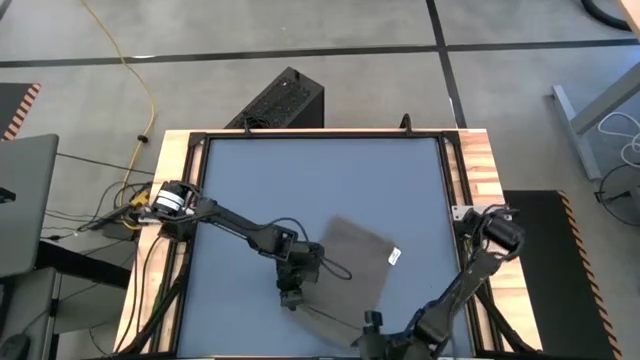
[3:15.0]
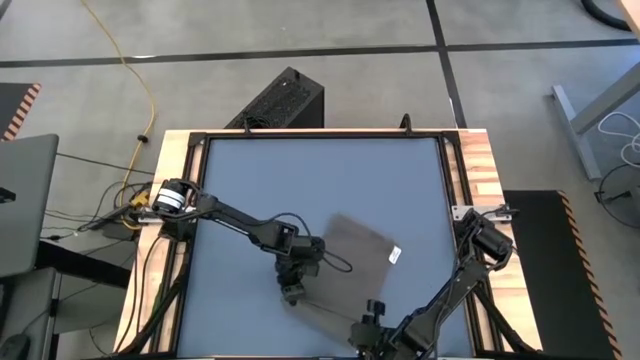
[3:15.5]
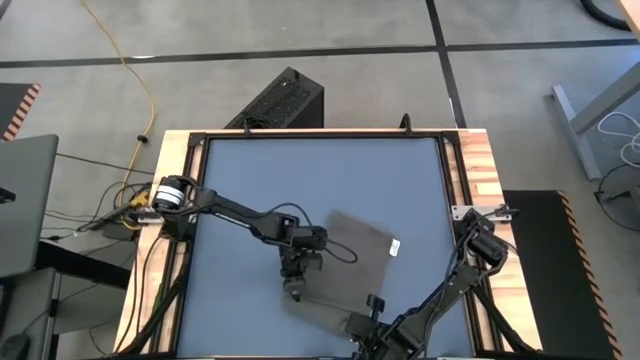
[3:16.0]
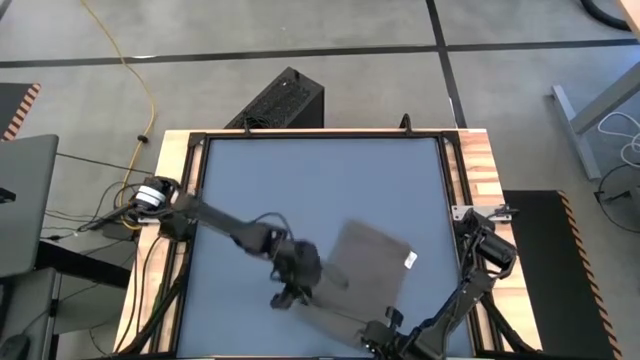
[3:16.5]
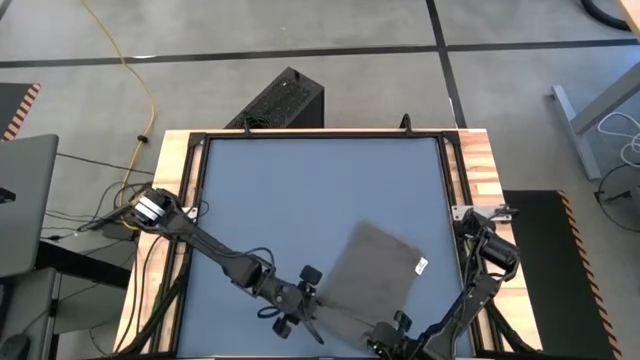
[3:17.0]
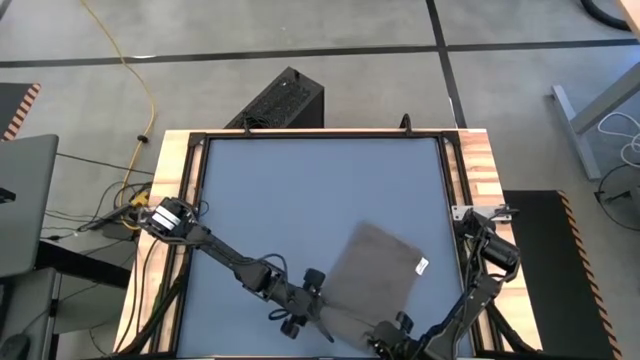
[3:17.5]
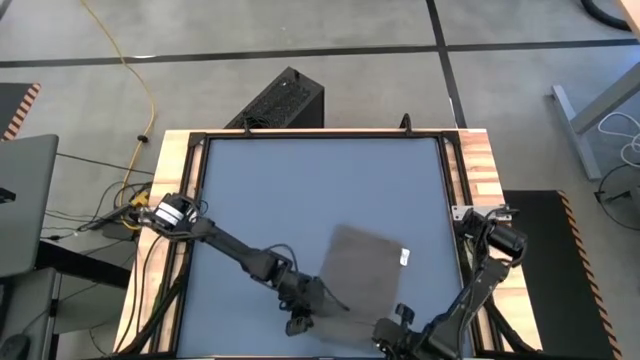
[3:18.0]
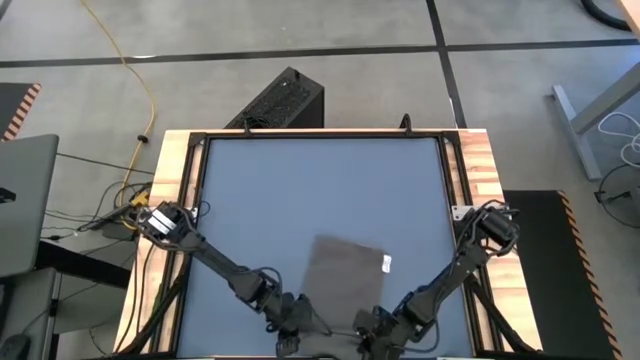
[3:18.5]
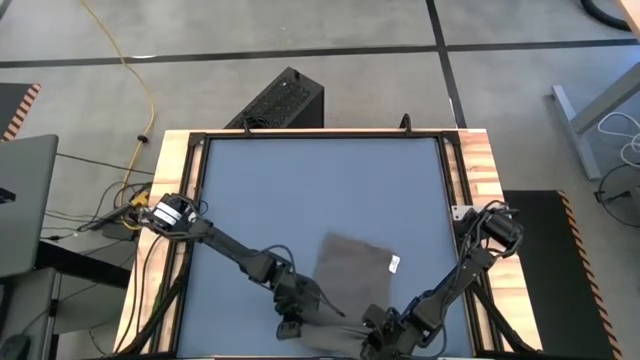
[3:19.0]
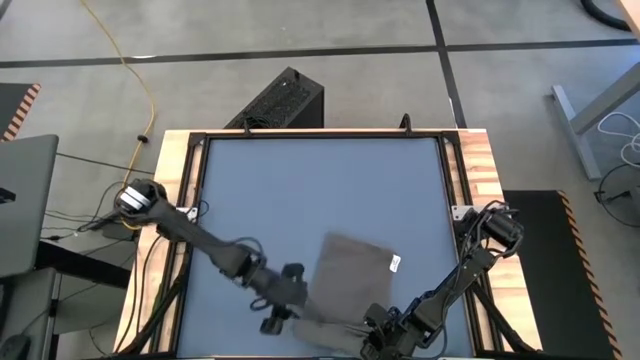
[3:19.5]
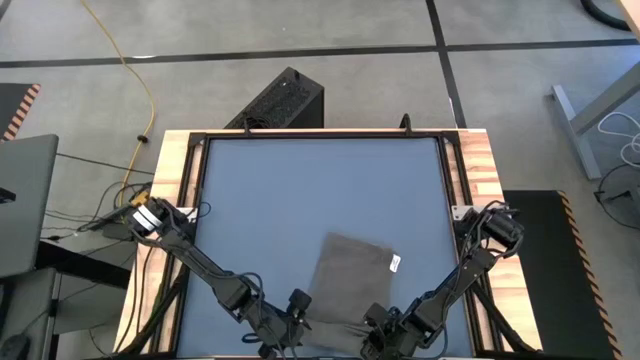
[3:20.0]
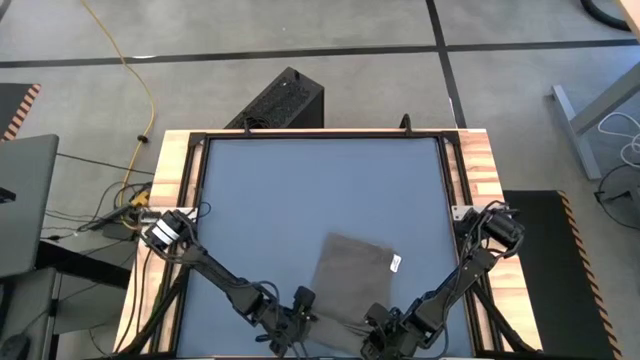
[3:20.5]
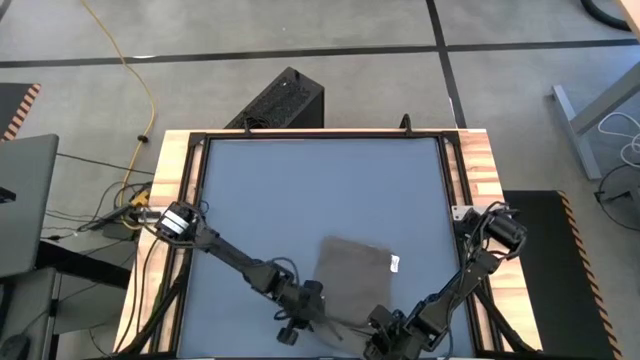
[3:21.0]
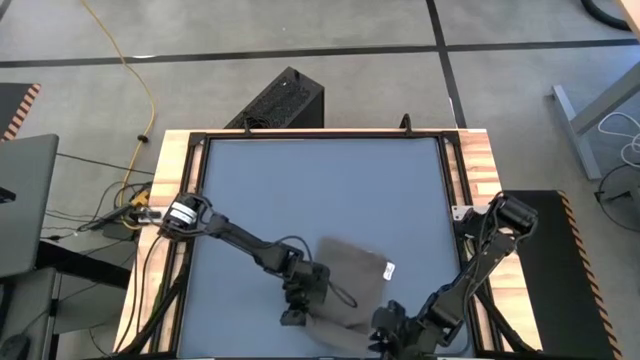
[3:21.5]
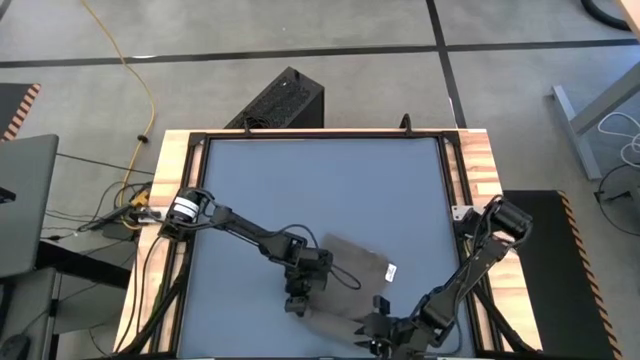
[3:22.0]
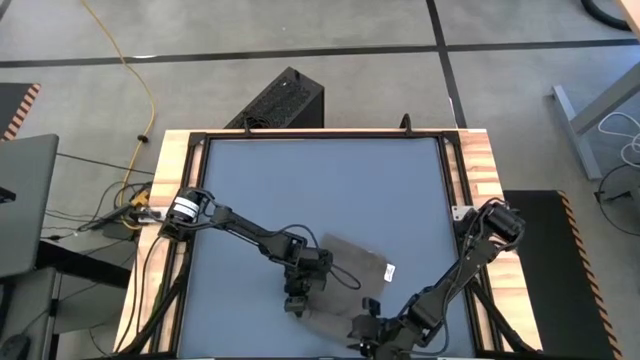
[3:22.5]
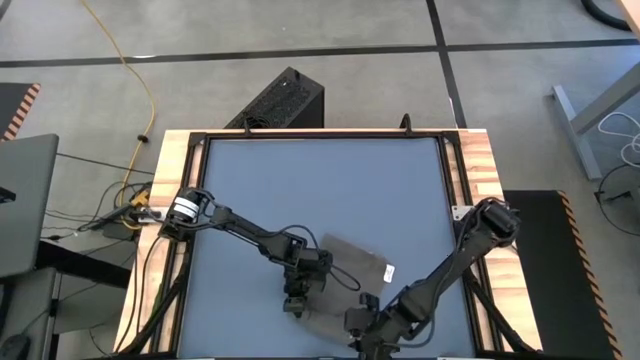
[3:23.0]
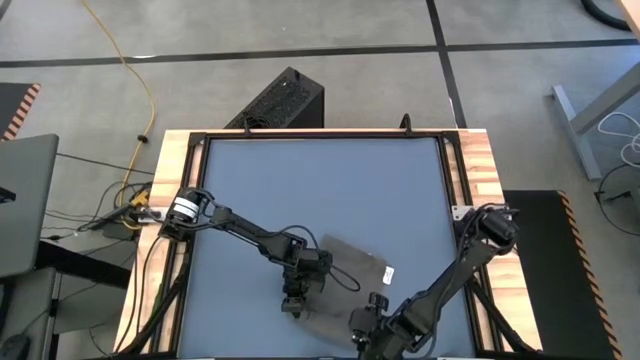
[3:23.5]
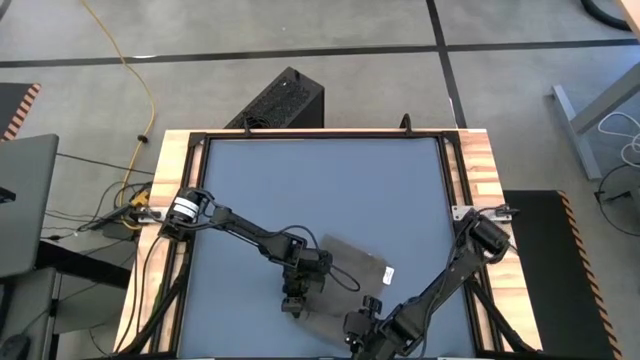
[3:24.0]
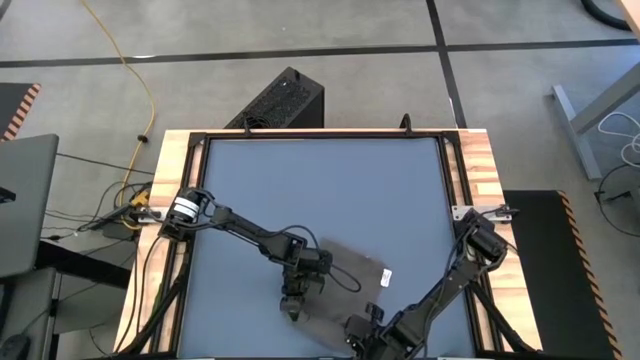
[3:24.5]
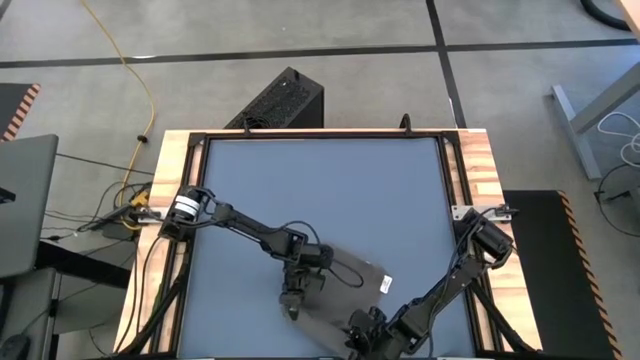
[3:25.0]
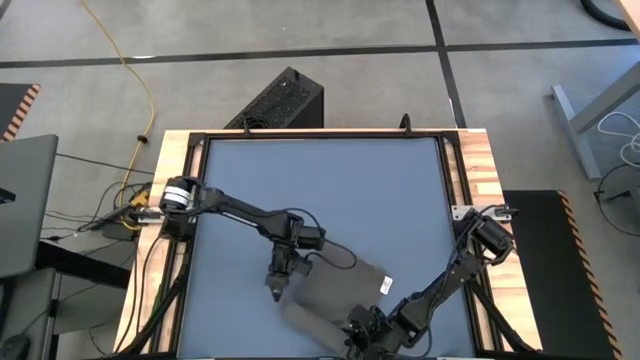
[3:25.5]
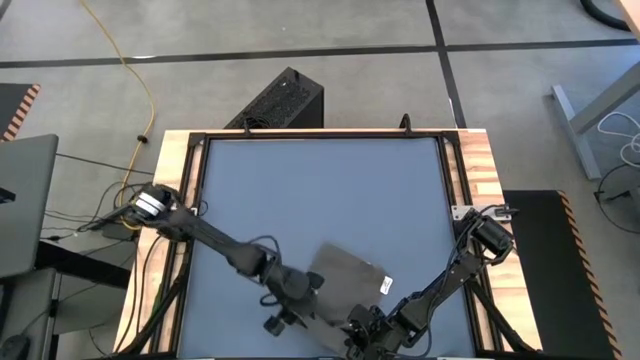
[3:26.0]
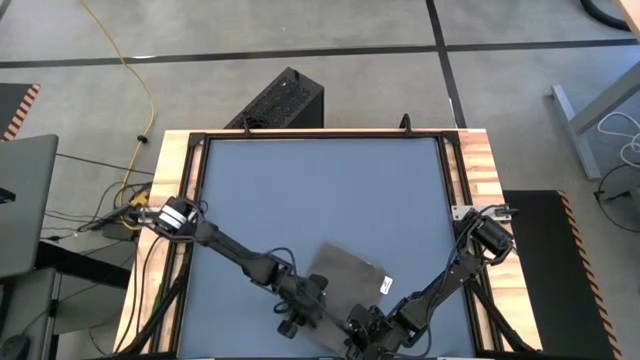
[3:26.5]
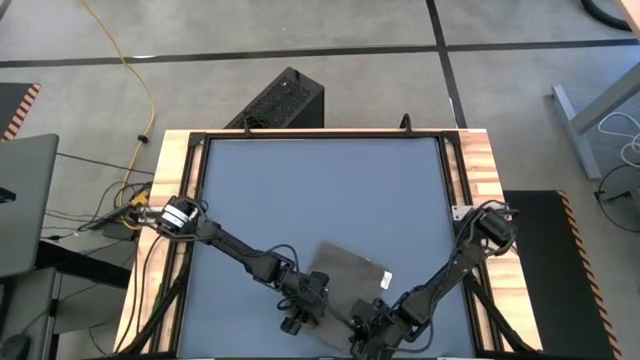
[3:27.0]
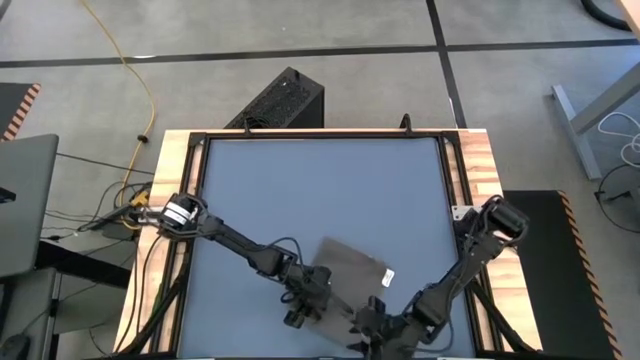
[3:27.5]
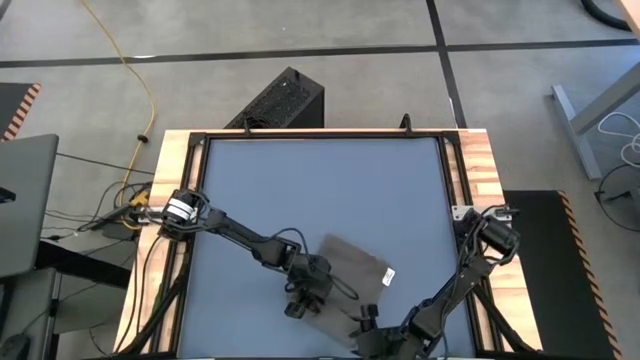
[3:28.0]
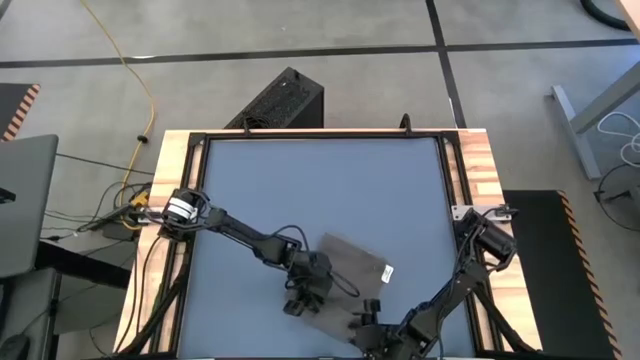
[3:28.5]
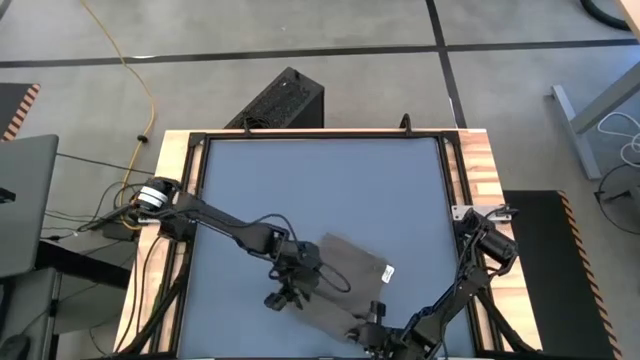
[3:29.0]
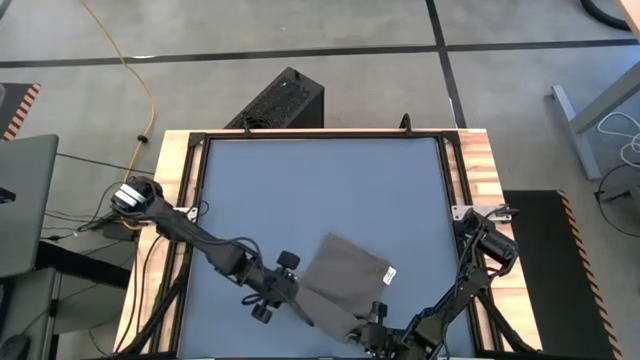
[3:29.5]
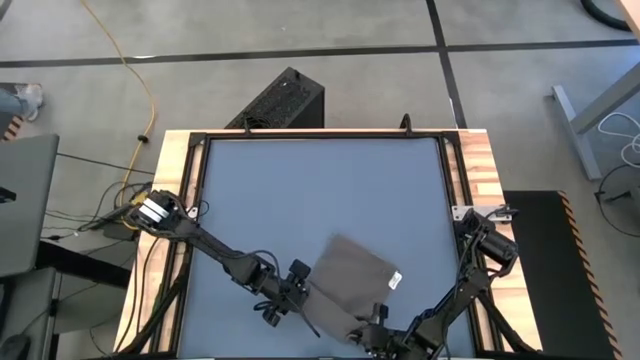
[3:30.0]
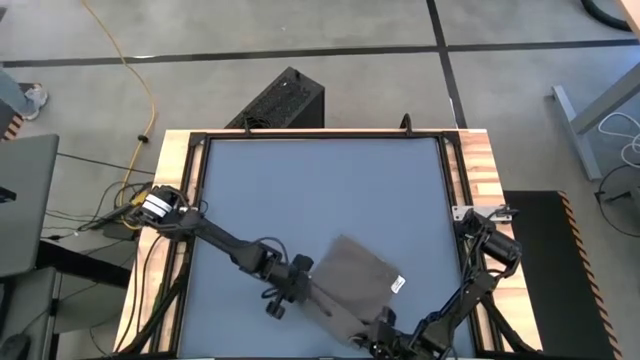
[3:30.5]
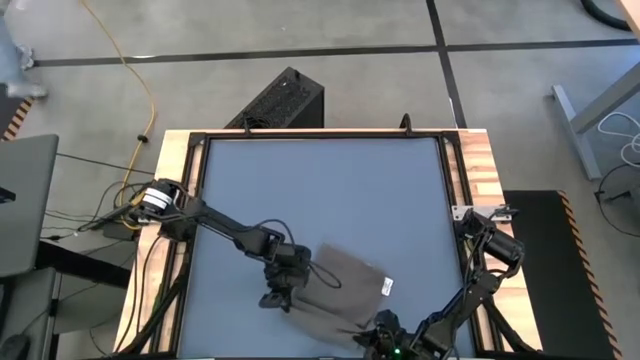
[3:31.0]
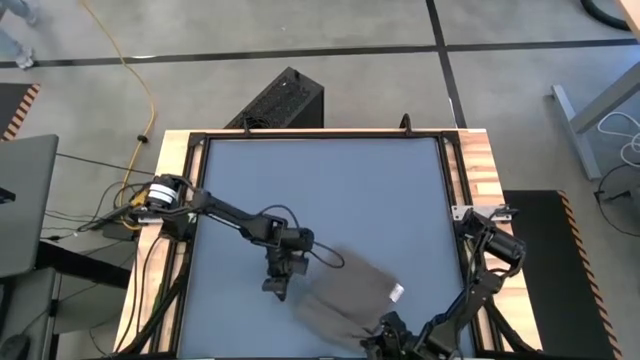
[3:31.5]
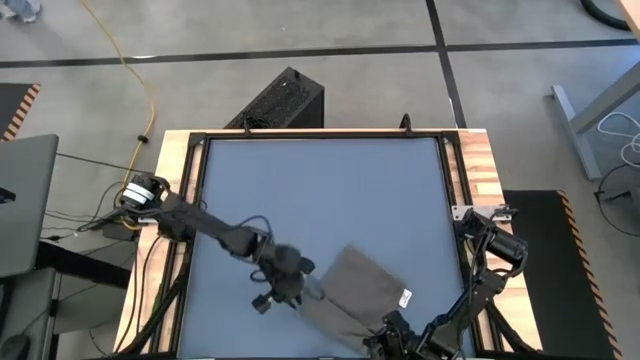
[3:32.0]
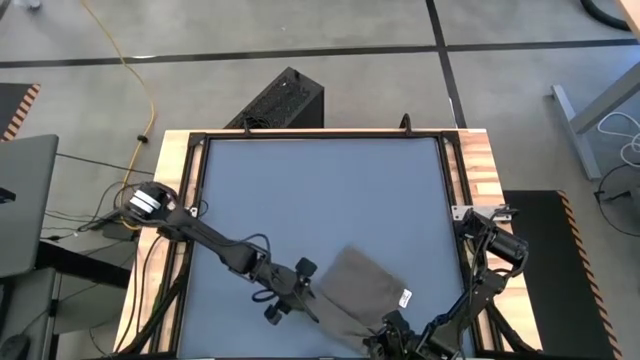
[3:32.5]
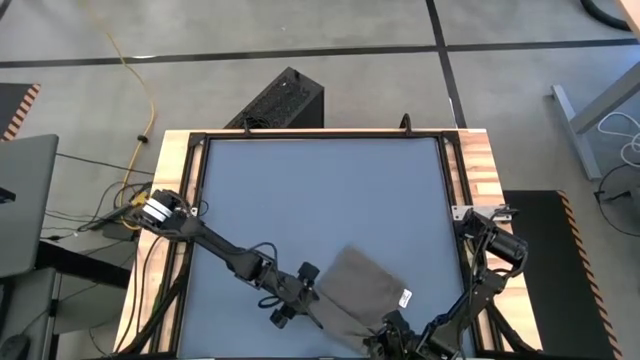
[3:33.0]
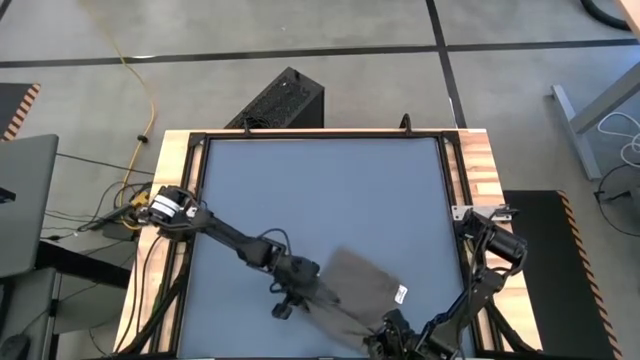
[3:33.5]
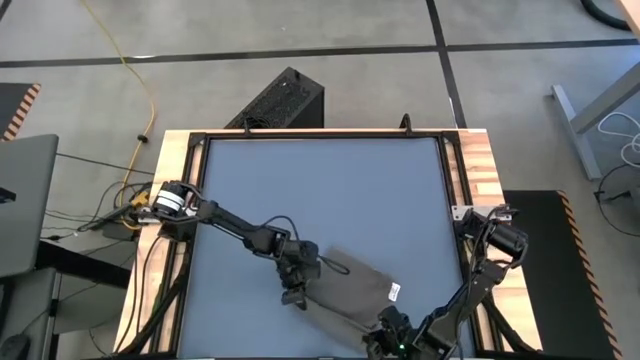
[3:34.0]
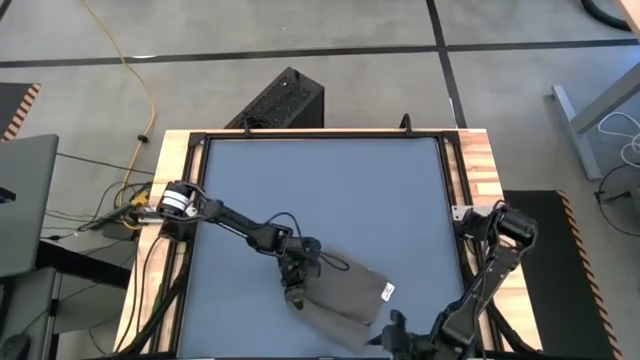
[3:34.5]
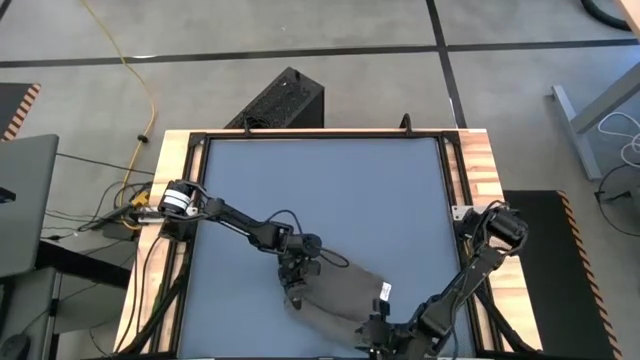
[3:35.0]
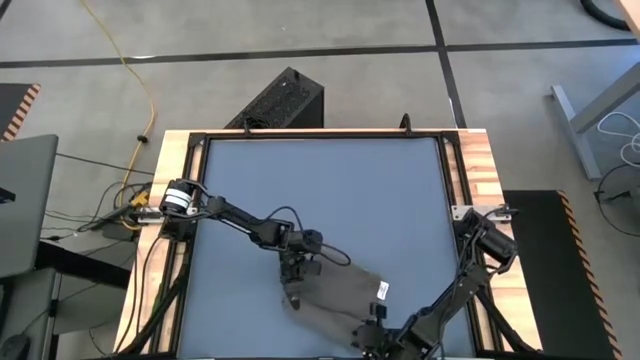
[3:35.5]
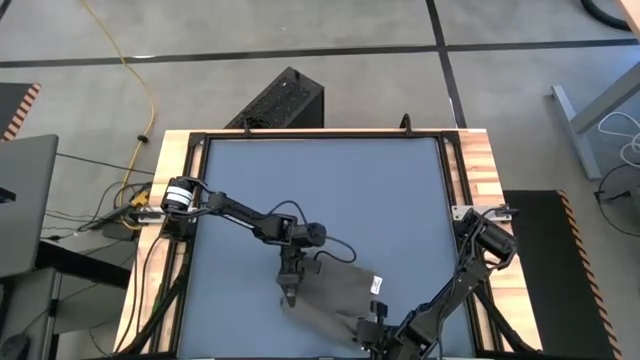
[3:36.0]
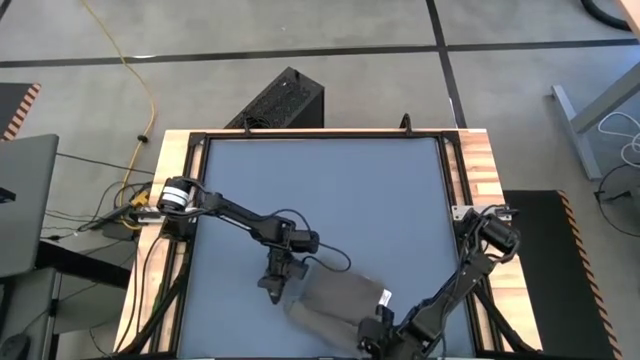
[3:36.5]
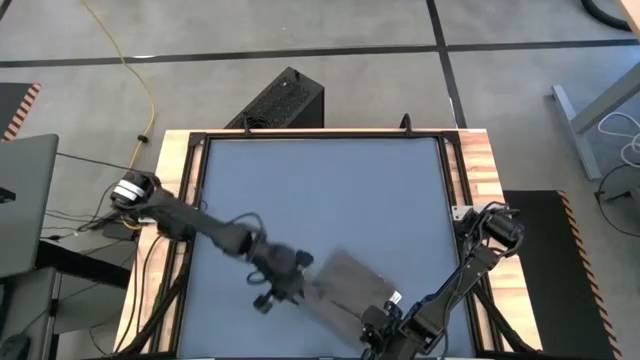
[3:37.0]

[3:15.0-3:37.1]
Task: Roll towel
Roll the gray towel
